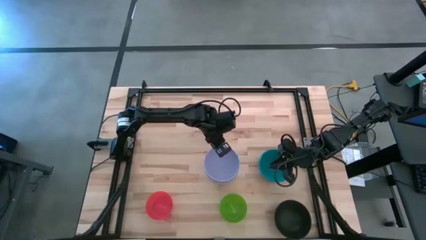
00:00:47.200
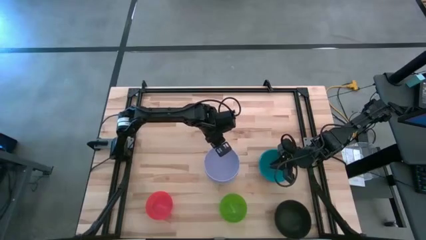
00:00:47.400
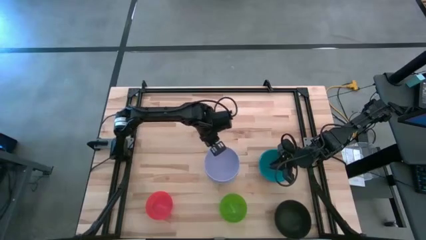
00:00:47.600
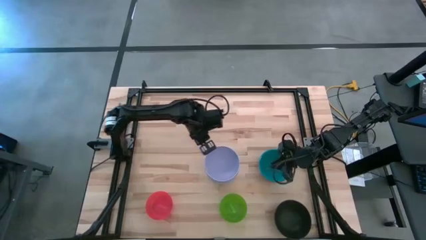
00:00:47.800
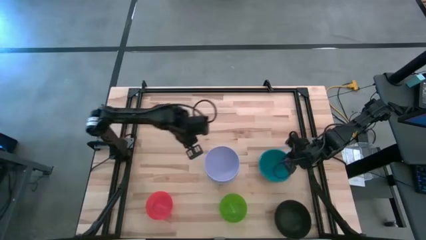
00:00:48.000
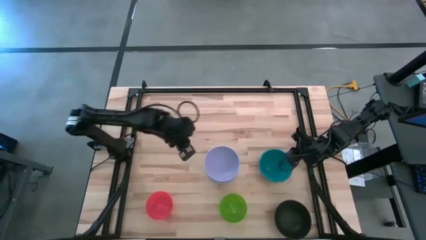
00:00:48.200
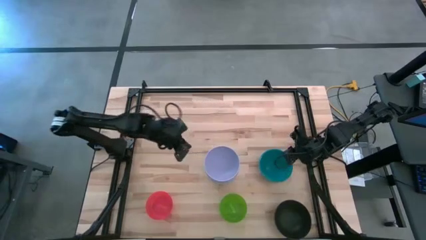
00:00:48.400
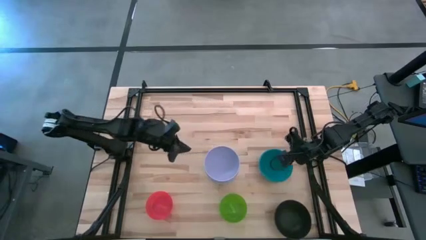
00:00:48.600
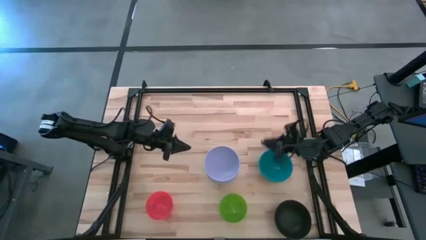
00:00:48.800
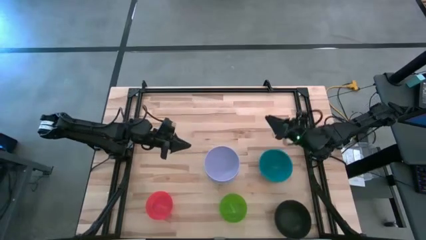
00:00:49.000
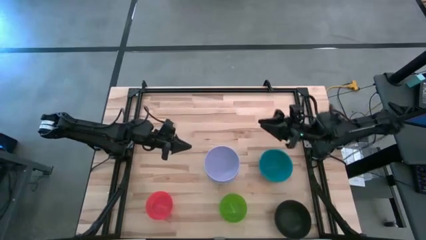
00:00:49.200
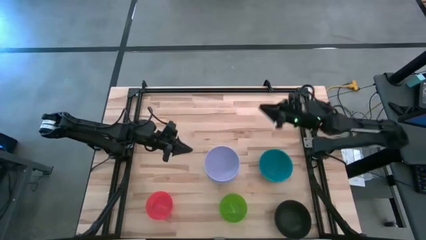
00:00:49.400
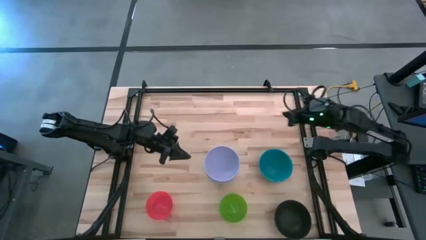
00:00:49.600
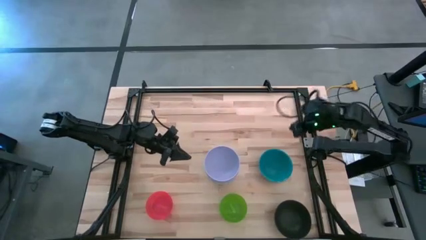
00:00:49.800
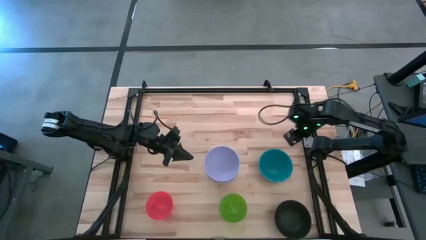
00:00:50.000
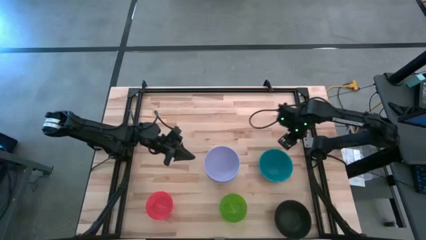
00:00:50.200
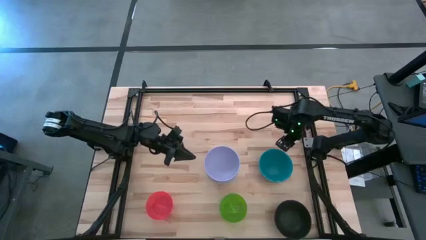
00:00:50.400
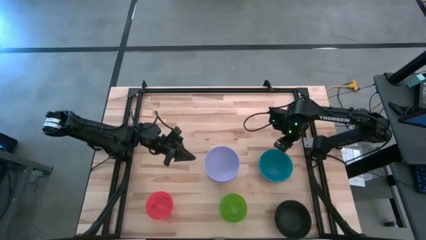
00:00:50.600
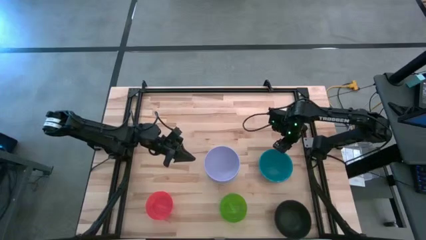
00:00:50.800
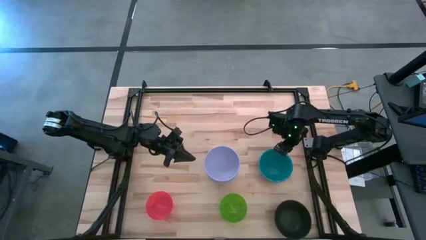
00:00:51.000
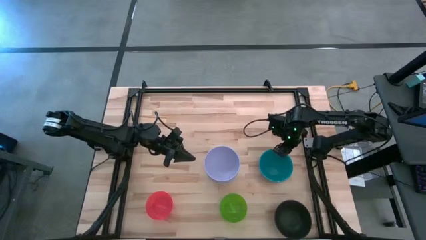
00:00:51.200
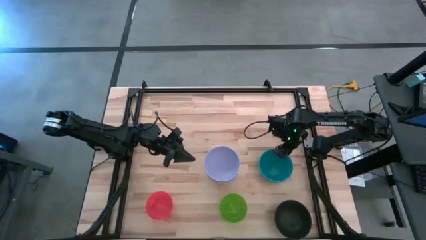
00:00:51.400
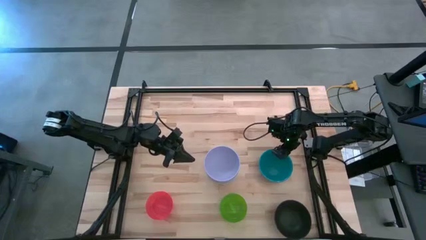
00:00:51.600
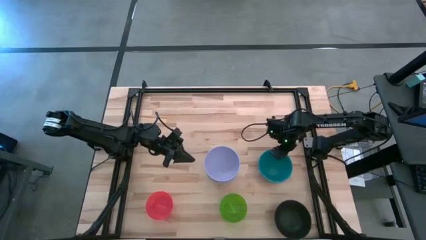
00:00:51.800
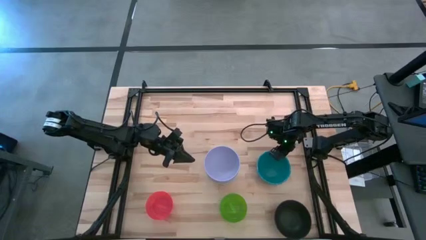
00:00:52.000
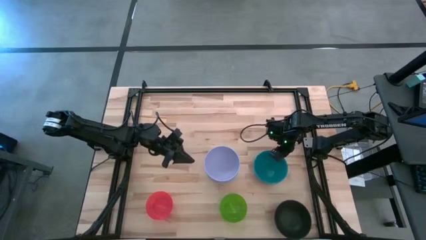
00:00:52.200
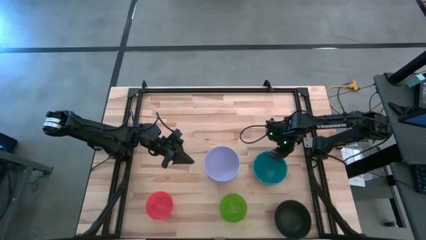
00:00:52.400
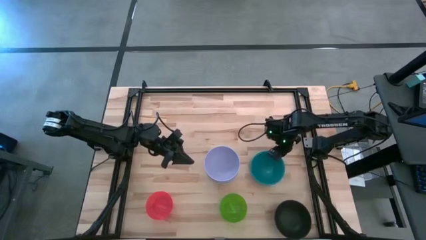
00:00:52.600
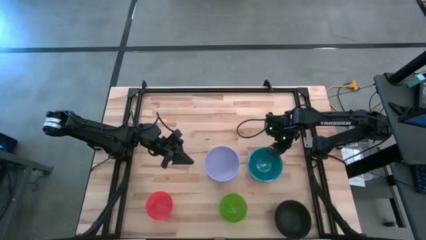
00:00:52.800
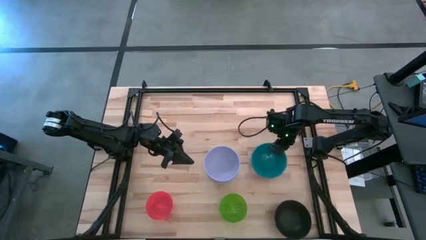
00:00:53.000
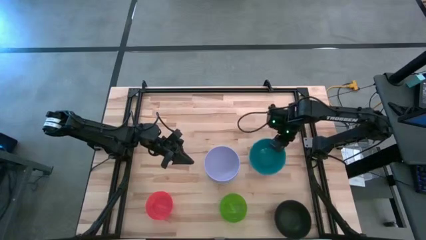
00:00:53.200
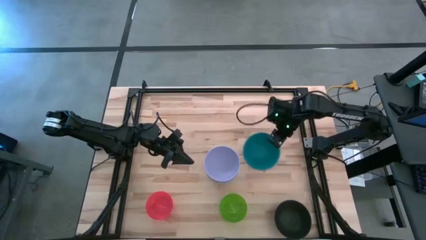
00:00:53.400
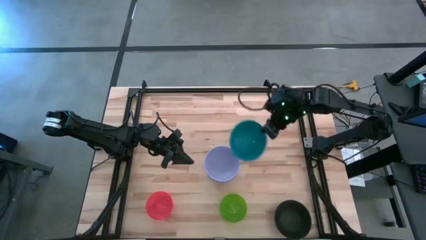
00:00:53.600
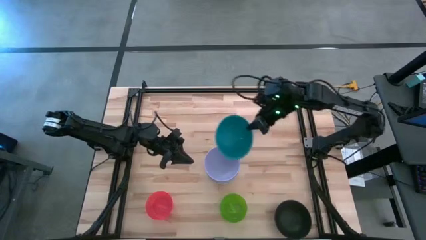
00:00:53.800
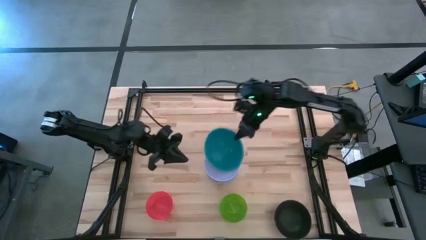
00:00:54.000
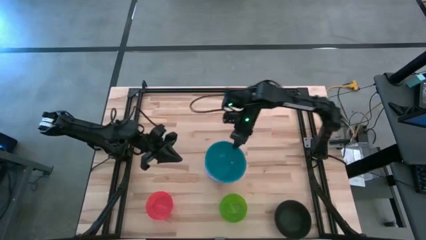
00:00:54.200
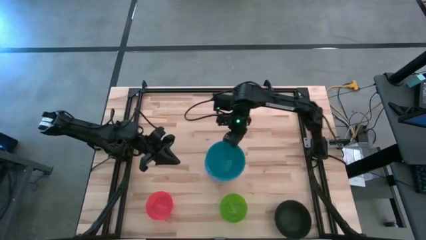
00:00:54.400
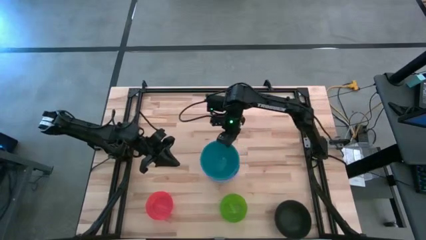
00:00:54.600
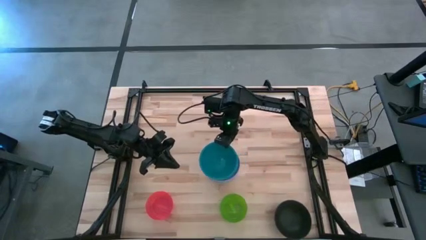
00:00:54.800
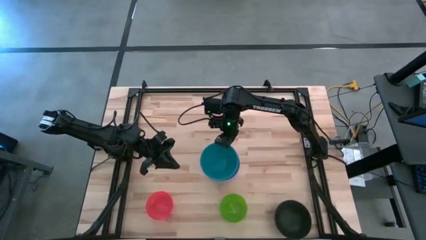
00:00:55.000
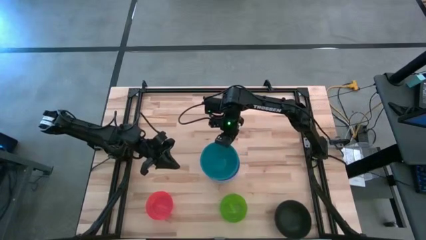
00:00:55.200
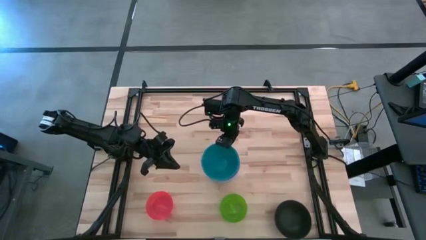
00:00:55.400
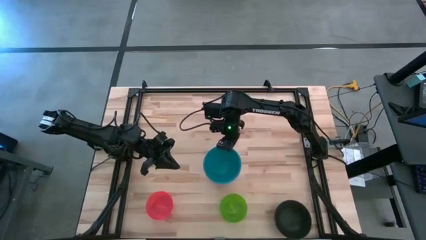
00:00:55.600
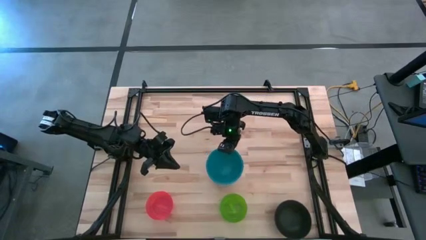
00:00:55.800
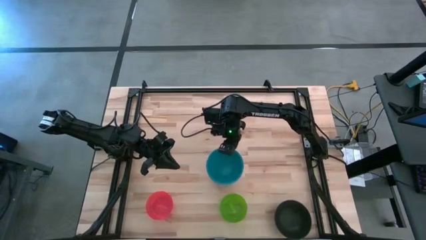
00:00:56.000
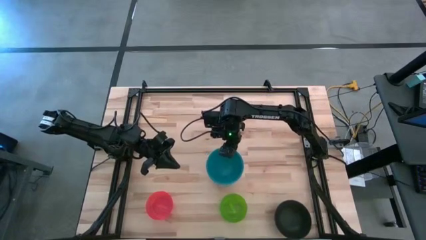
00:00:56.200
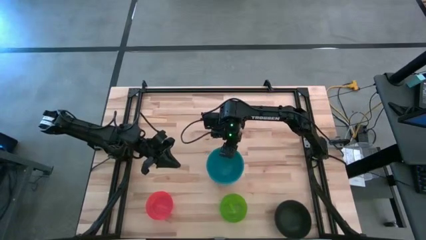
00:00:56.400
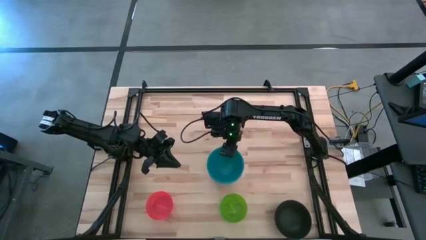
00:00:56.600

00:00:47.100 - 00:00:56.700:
Task: Nest bowls inside each other
Stack the blue bowl on top of the purple bowl

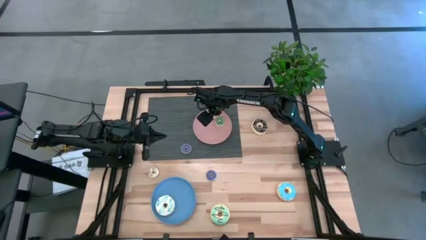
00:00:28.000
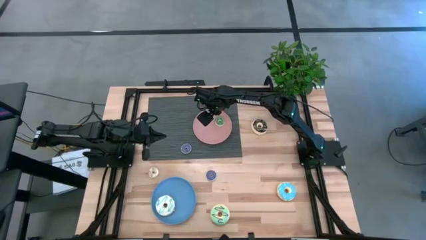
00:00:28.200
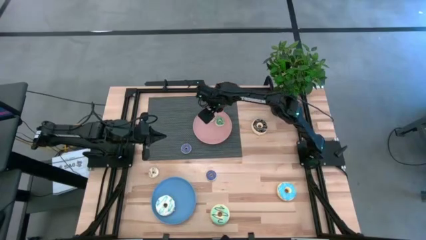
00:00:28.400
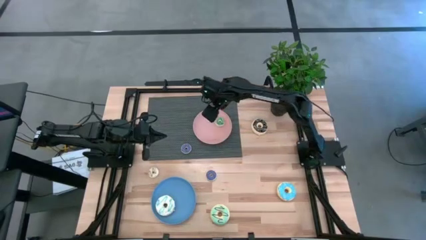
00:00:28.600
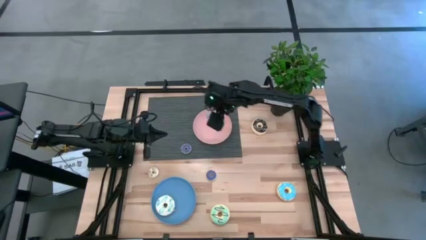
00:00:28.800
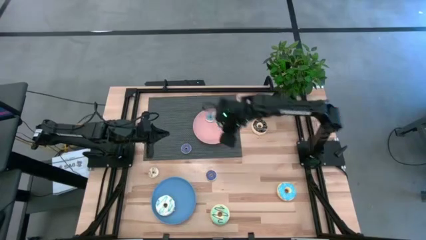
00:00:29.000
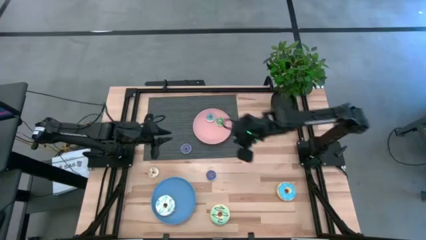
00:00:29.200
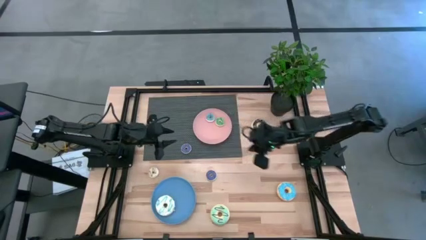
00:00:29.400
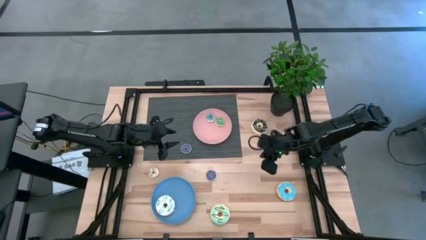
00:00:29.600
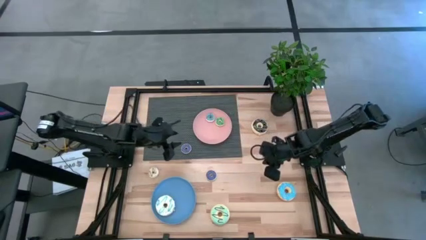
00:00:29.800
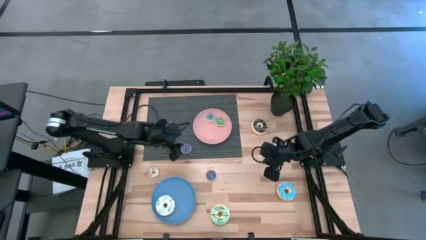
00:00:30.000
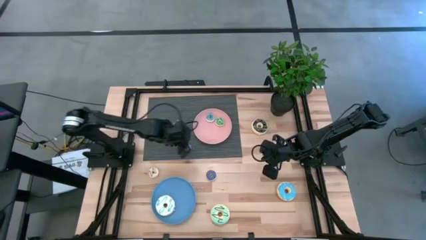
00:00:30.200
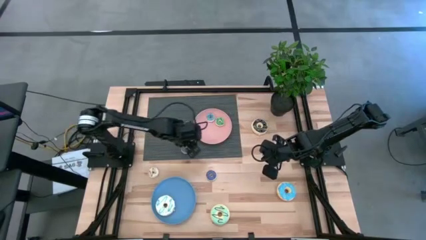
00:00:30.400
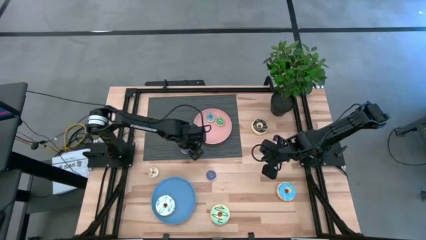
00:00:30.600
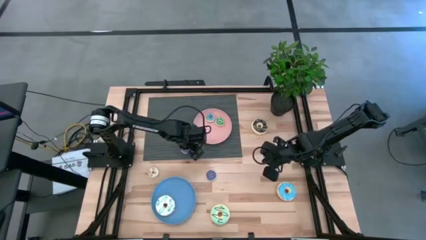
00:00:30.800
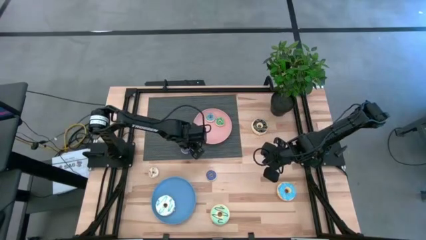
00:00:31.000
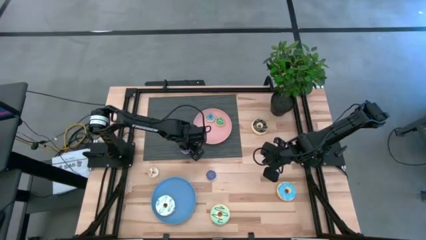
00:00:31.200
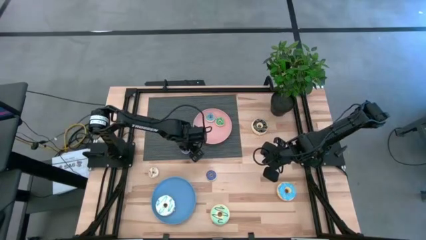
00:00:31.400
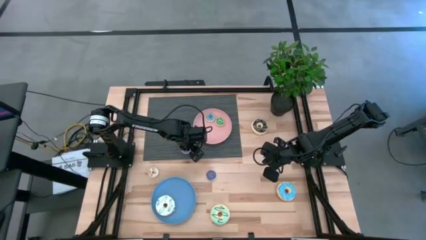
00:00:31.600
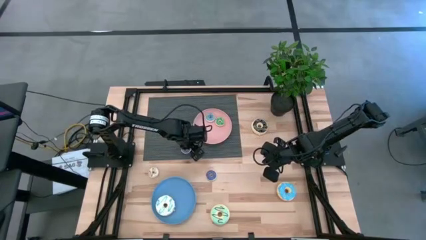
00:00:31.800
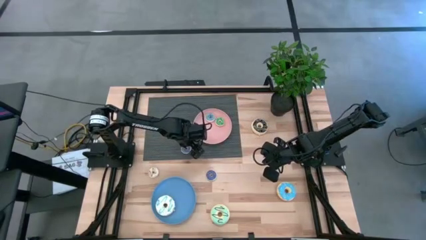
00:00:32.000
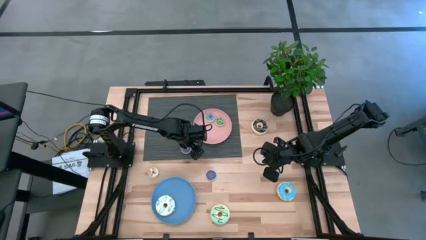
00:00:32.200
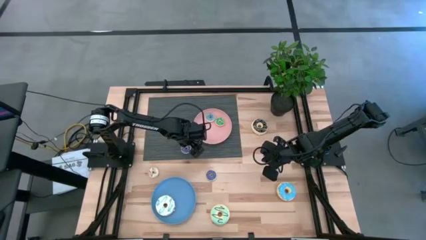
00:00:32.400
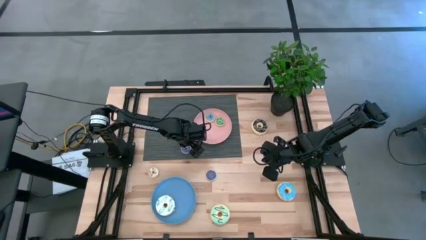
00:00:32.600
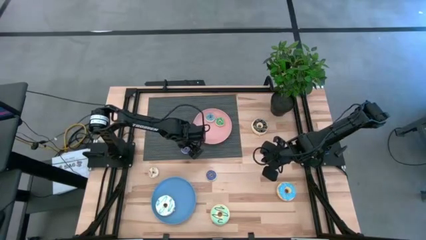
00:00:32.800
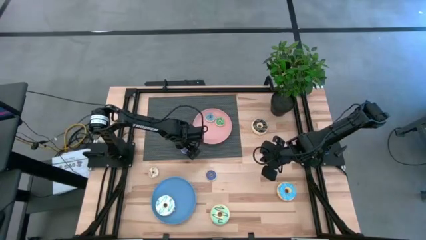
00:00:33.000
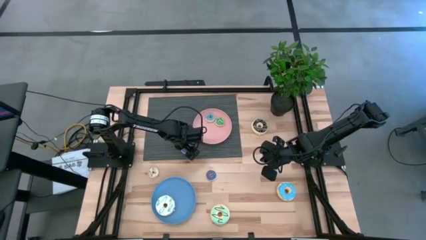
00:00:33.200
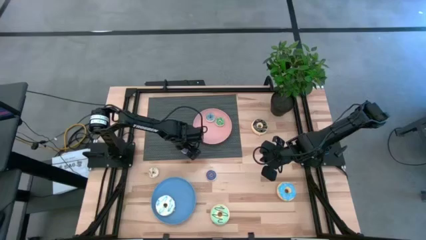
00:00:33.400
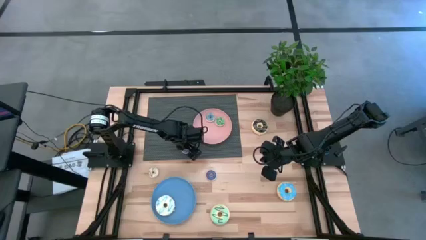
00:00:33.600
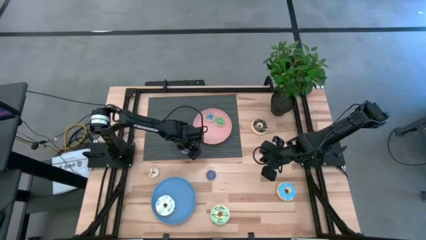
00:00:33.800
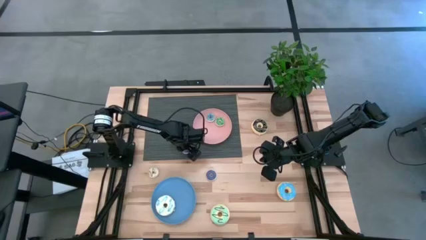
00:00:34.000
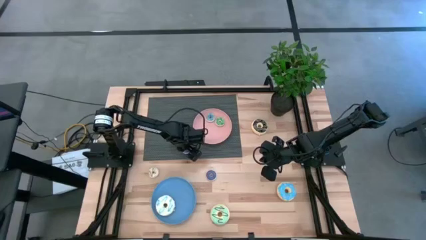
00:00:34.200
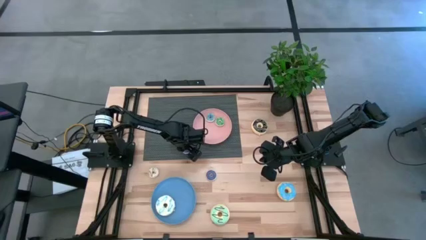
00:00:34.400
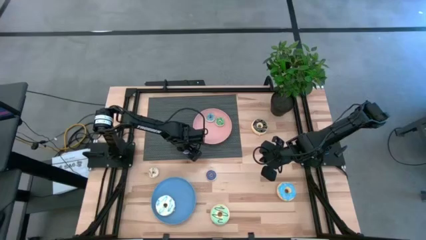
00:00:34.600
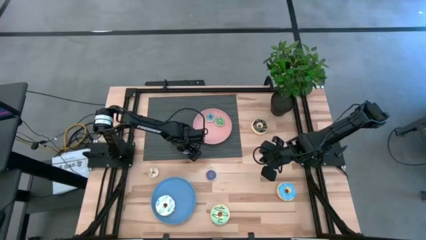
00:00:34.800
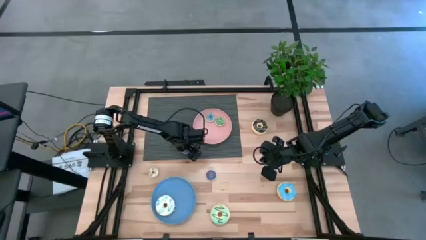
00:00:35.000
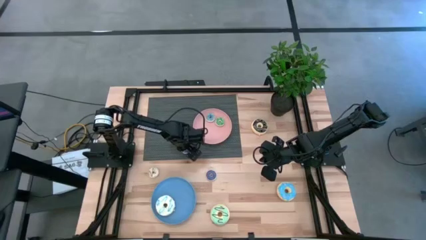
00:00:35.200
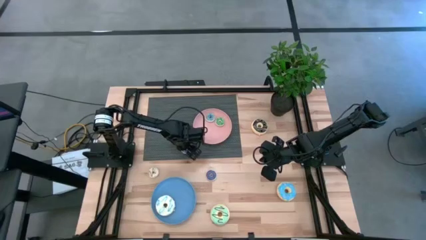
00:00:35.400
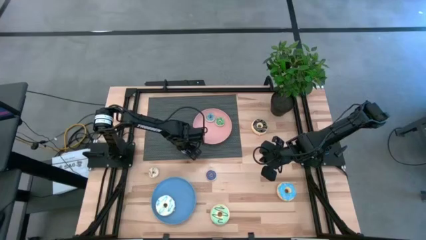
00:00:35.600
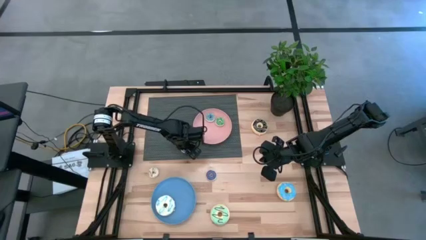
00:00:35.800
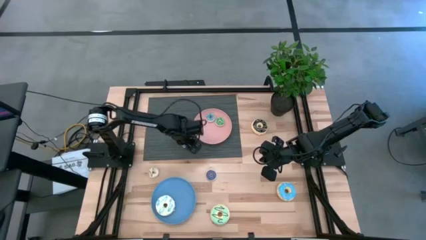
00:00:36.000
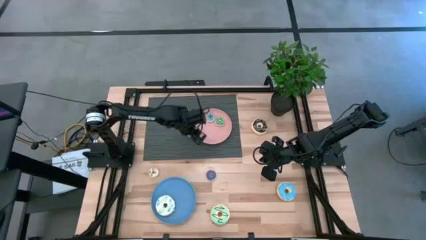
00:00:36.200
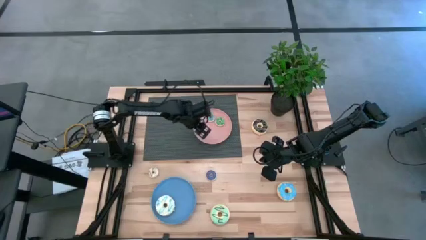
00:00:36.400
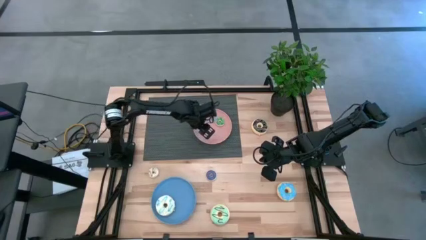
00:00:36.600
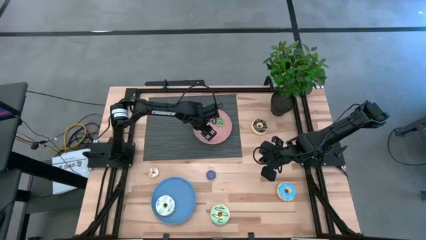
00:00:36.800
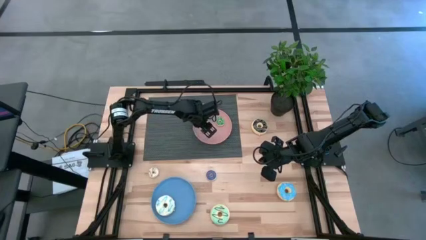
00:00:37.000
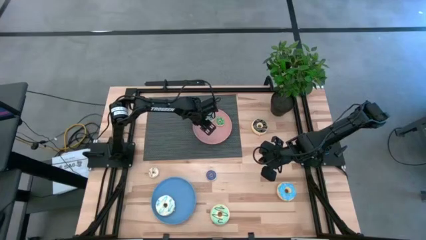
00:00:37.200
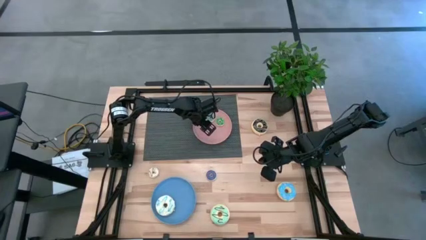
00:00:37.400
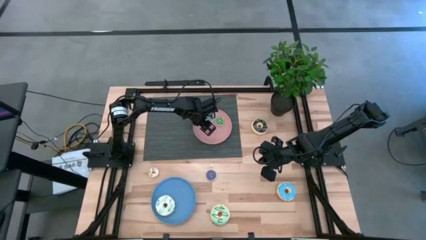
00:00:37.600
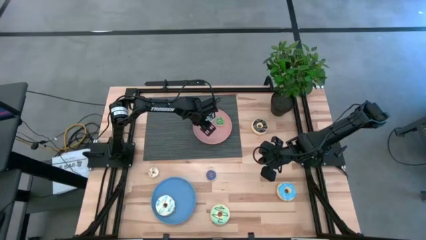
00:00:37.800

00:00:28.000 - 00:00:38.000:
Task: Pick & Place donuts
Put the top small blue donut on the pink plate
